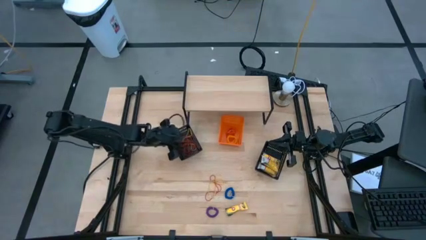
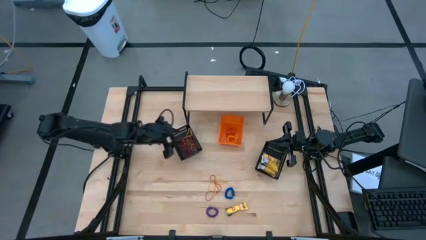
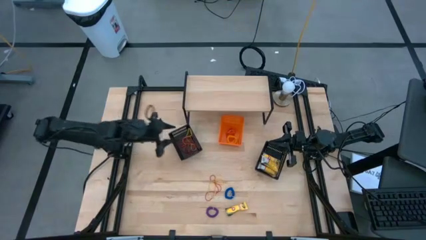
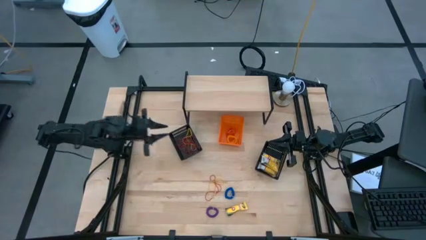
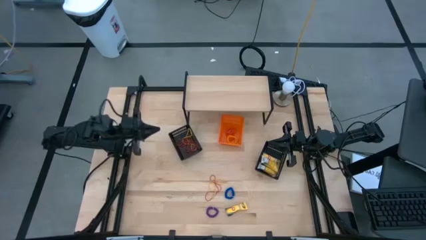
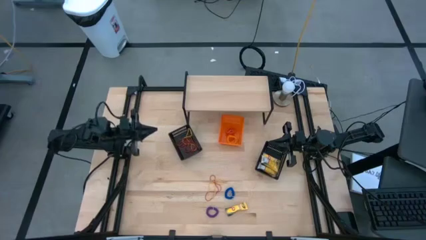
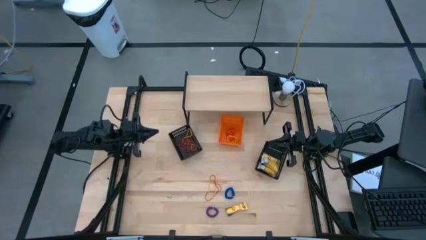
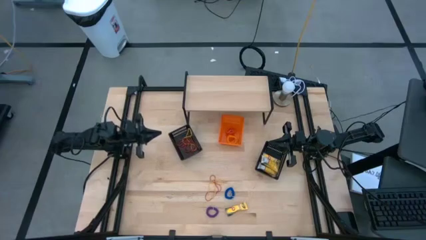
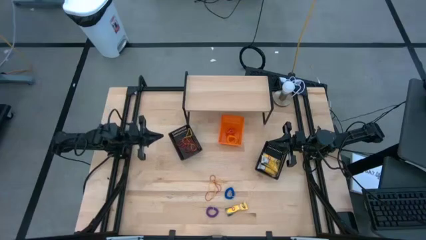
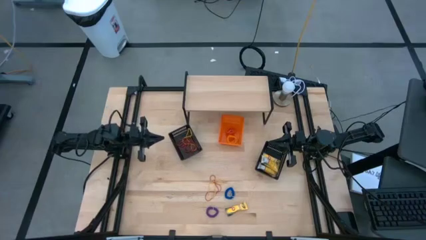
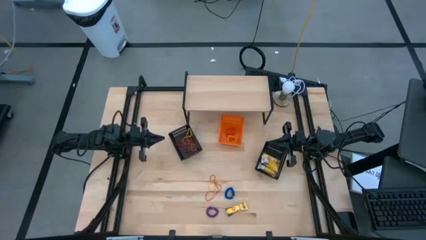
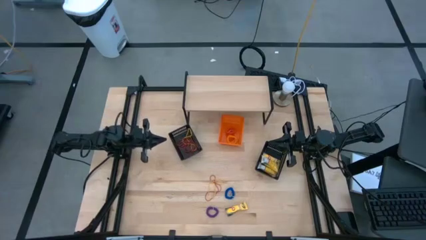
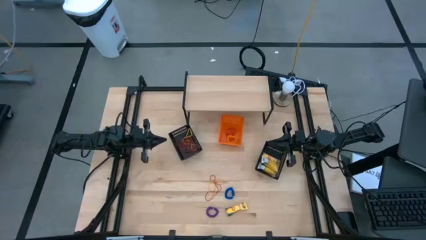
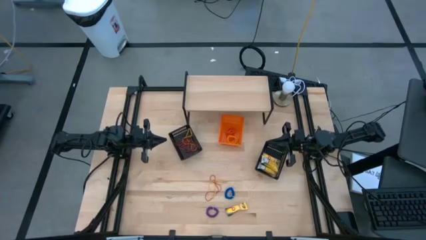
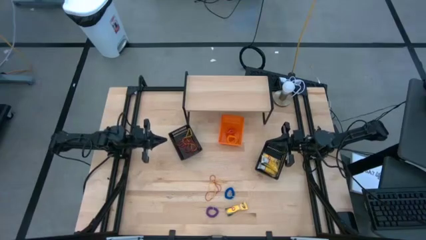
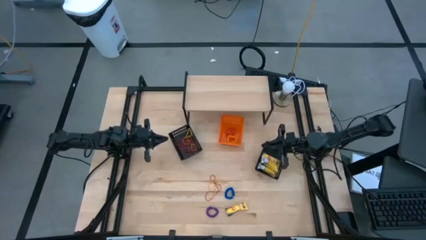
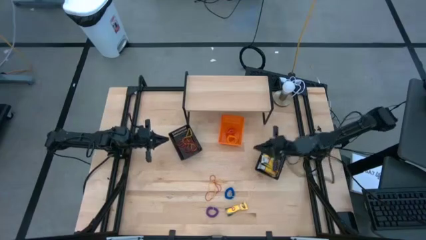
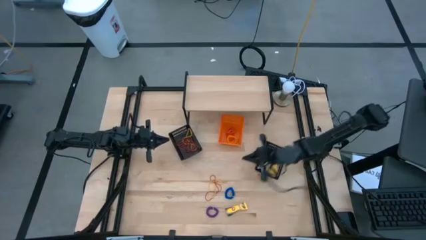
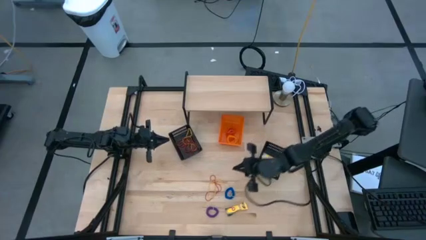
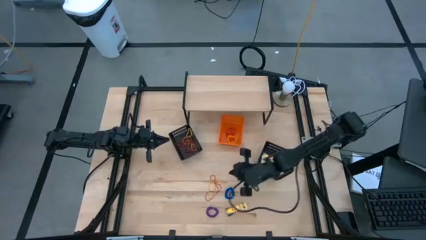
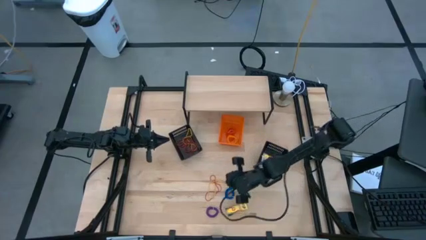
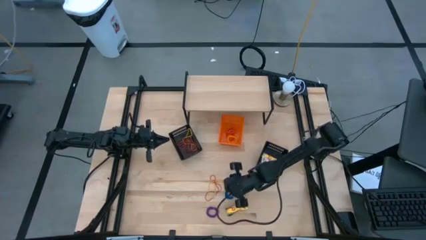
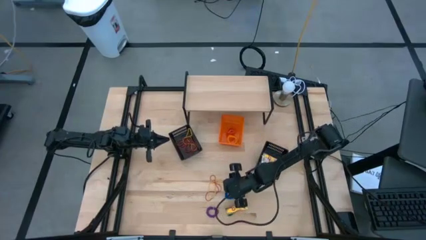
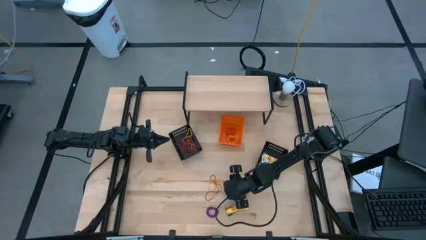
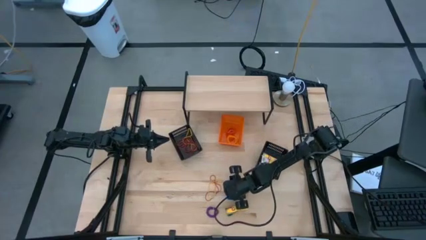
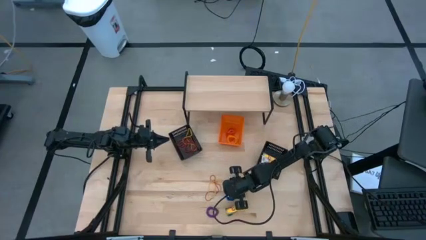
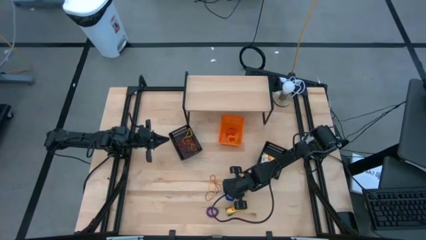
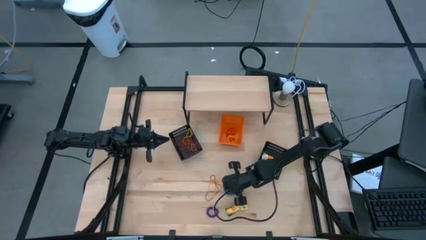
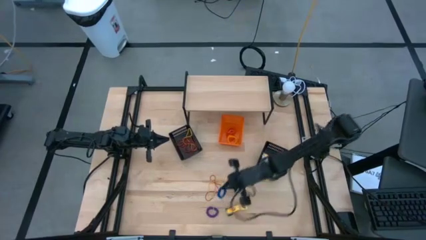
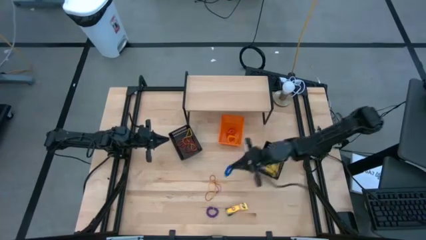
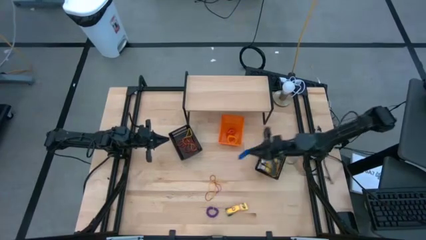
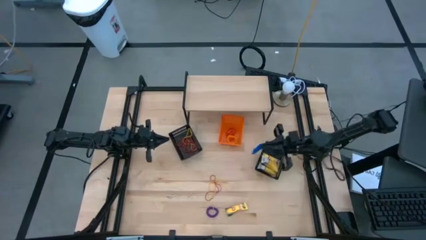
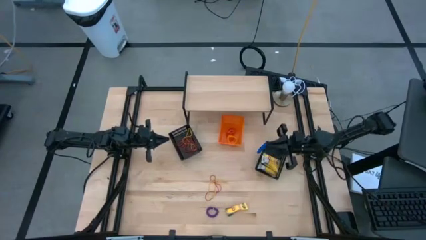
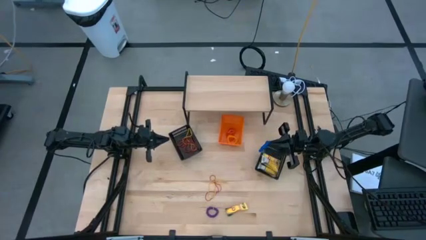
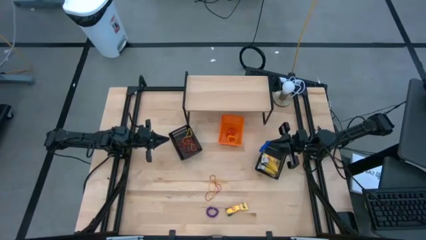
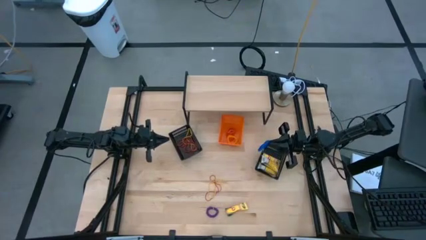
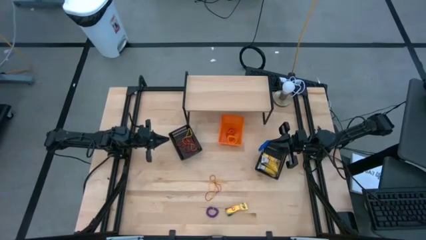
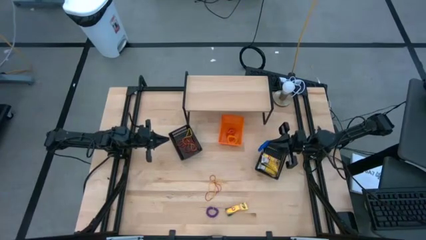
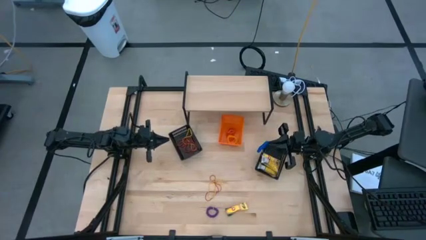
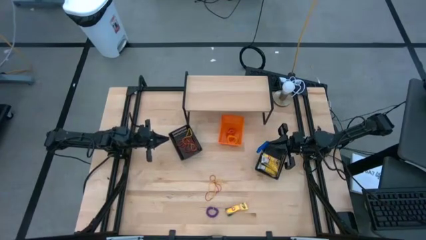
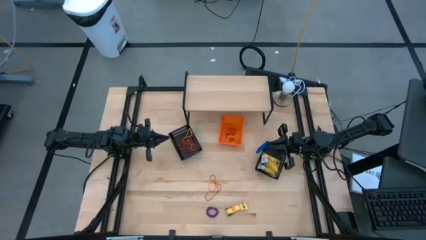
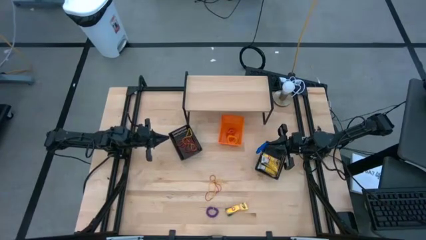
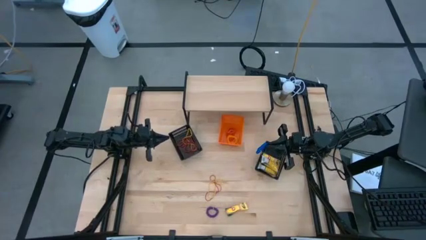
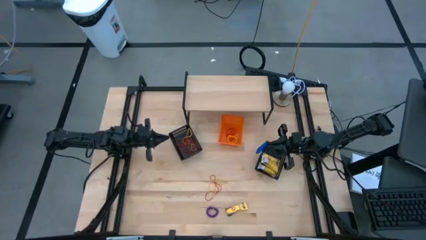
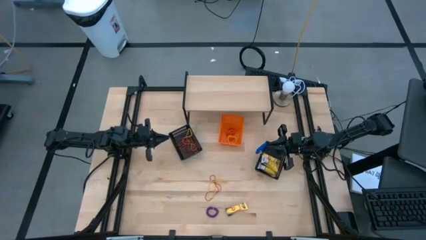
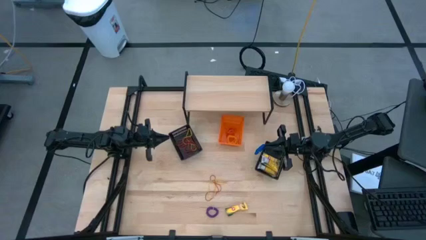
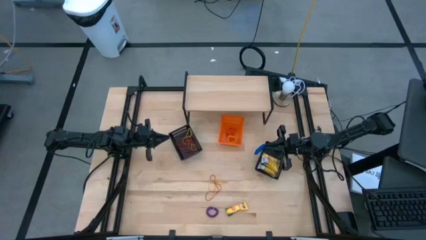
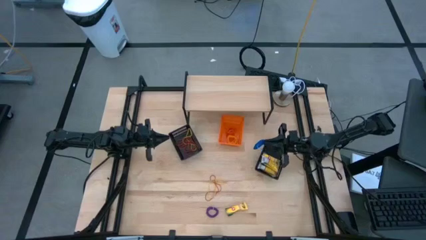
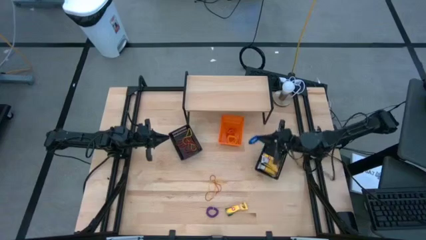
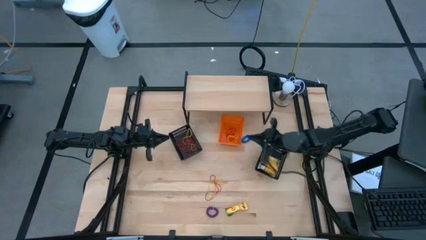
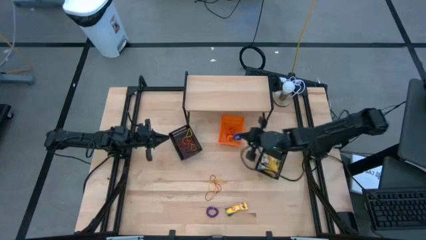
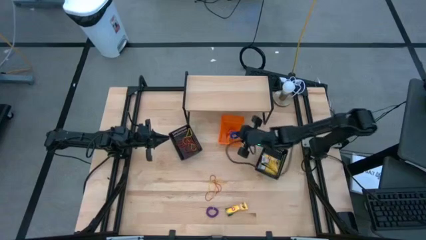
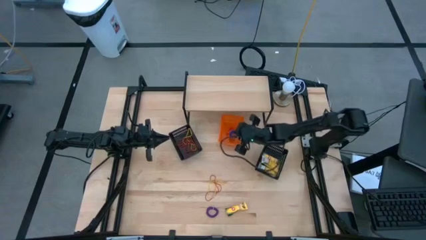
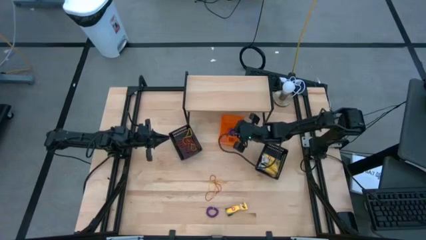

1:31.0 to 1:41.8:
Task: Pick & Place Office Desk Supplies
Put the blue spring keychain into the orange bin
